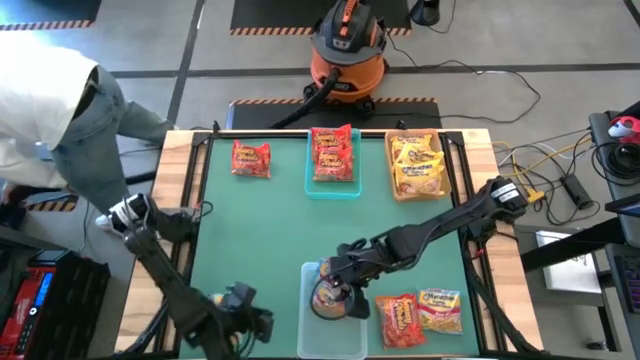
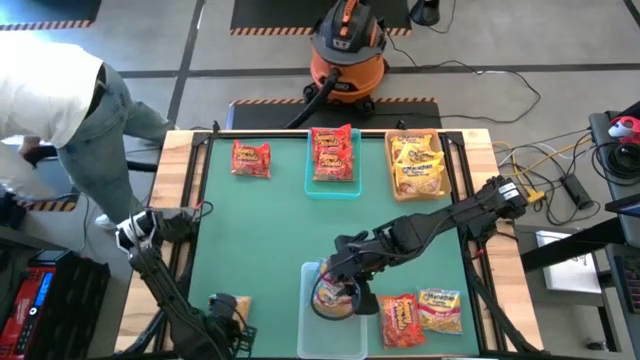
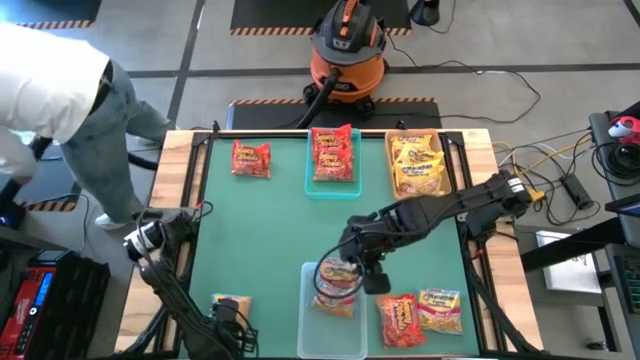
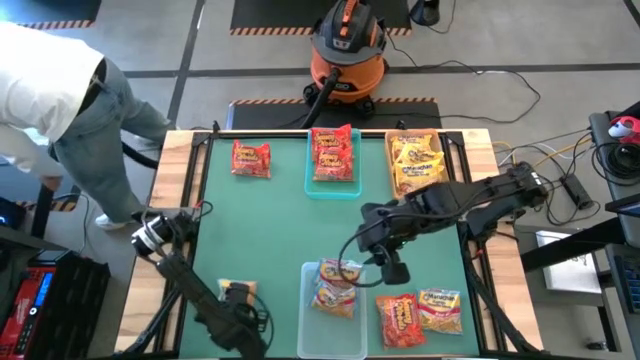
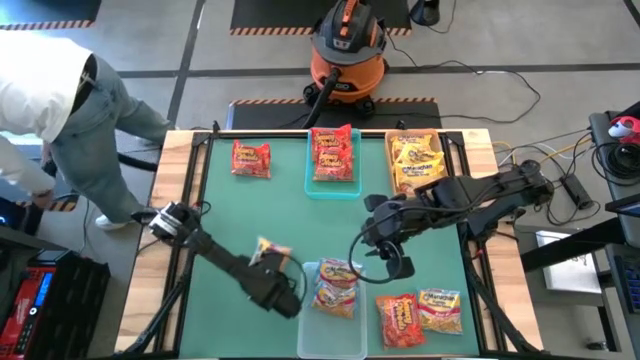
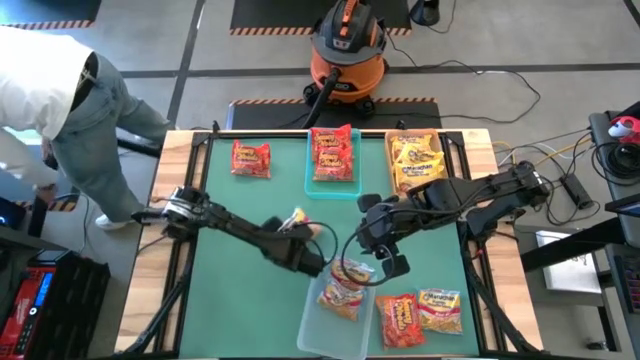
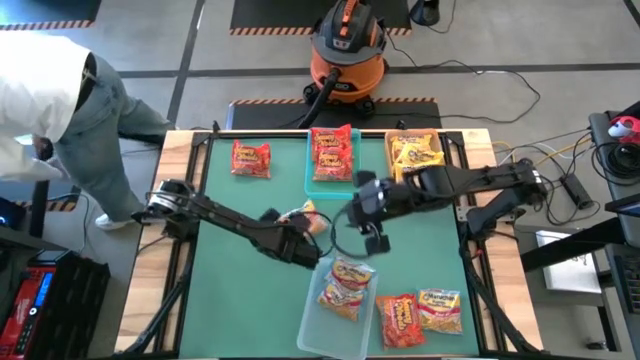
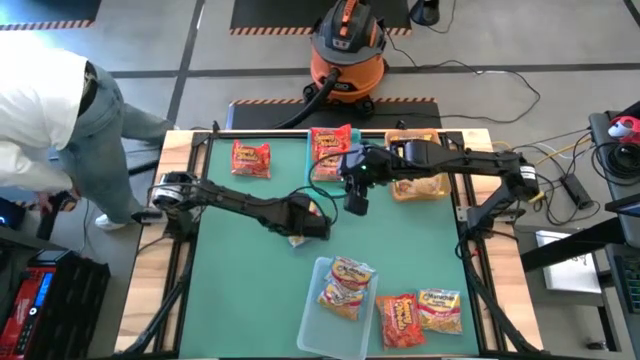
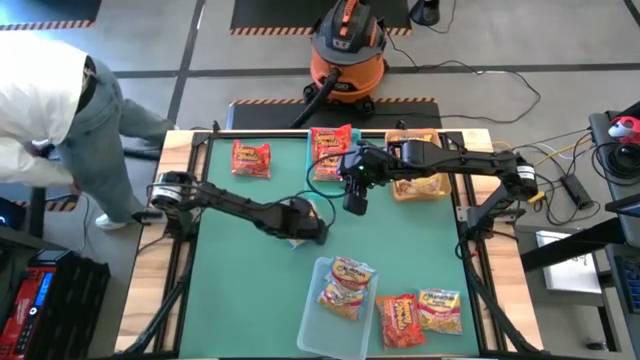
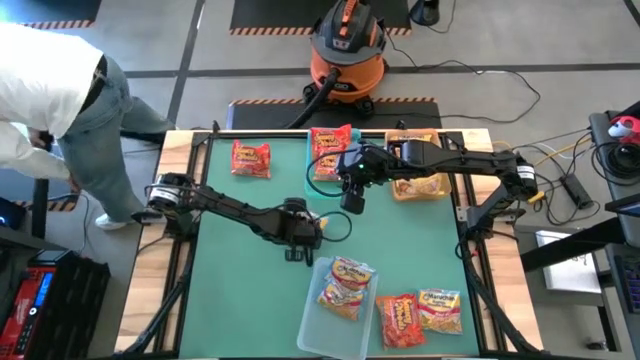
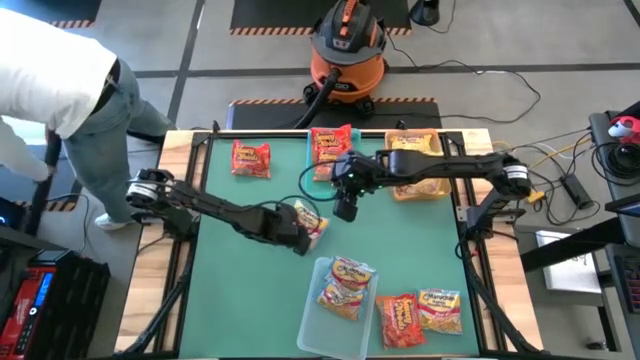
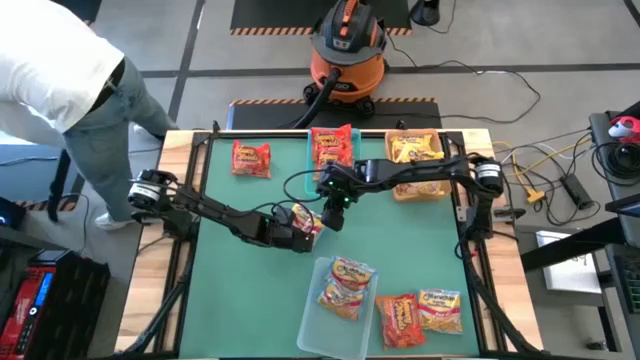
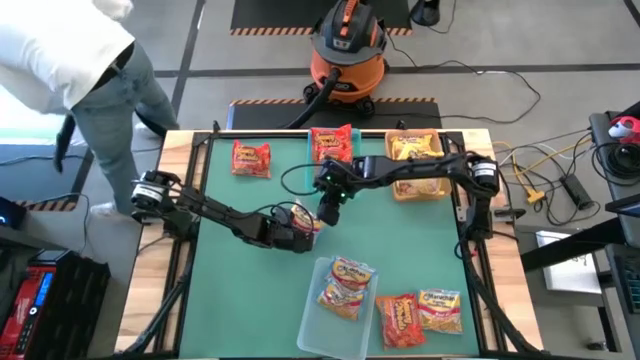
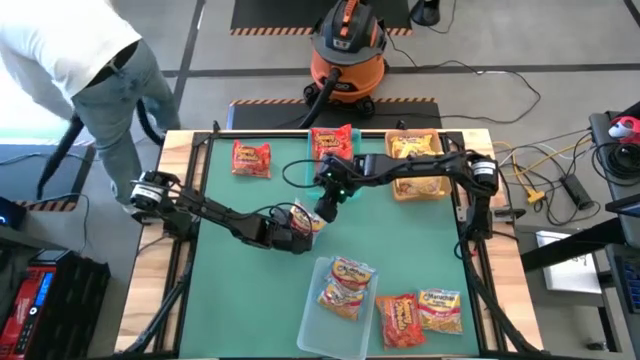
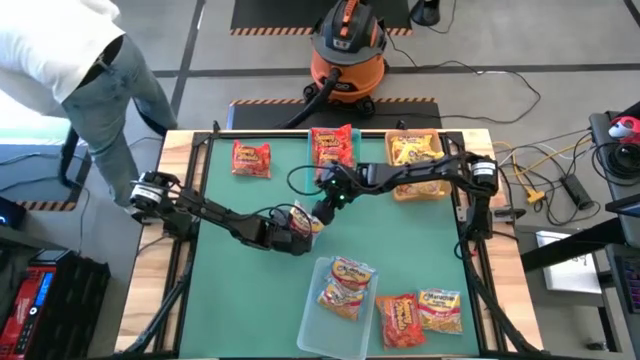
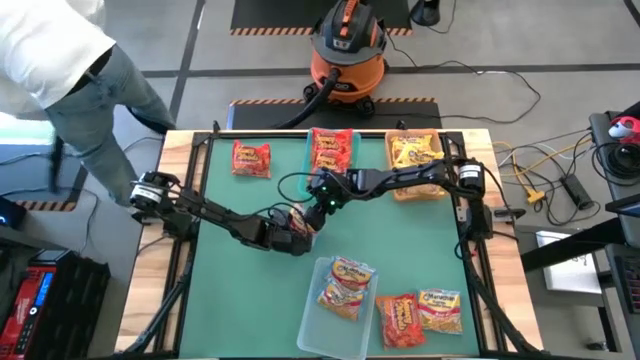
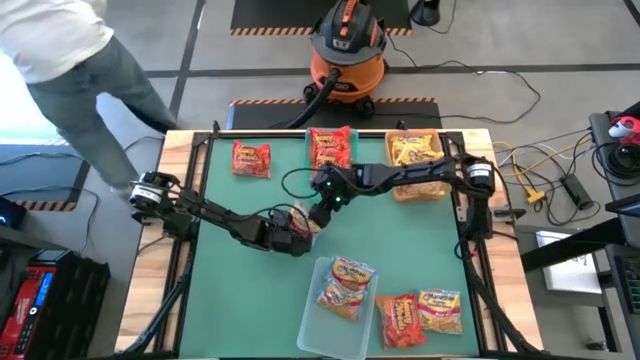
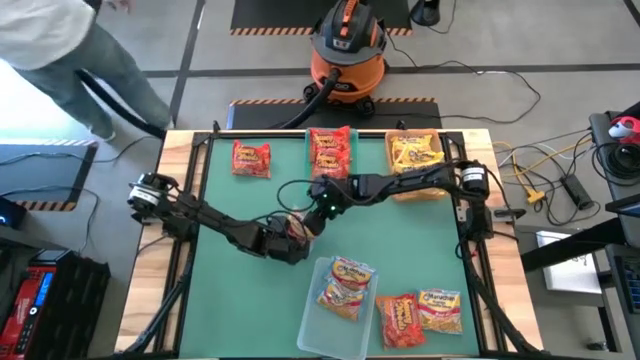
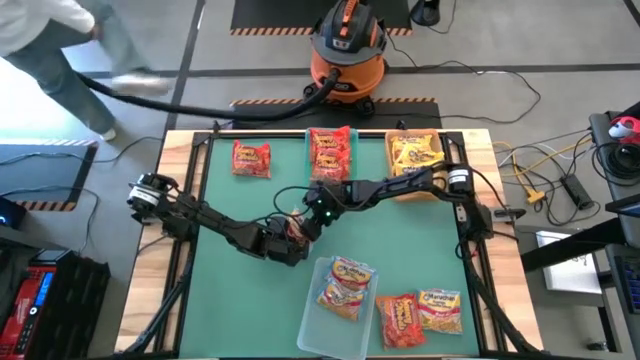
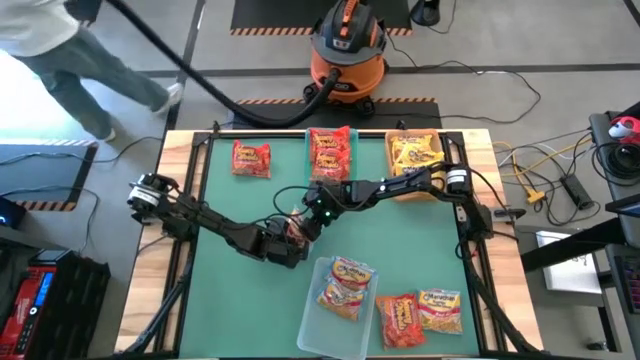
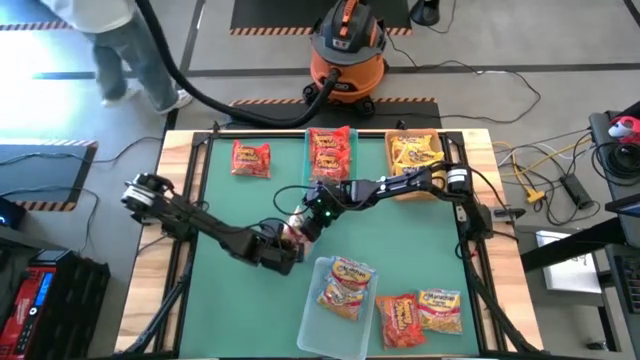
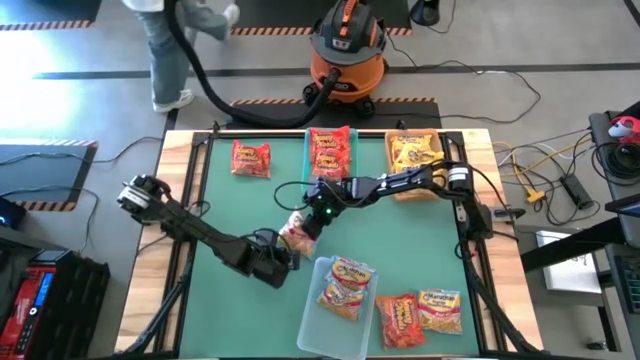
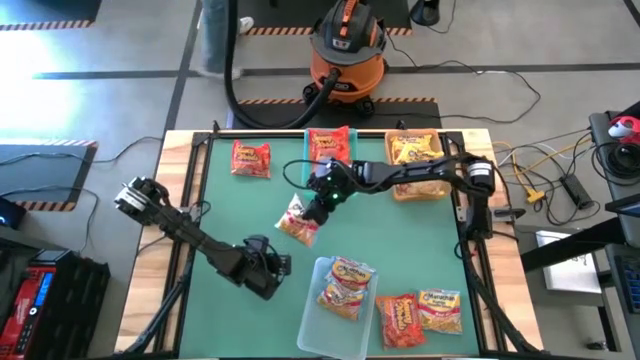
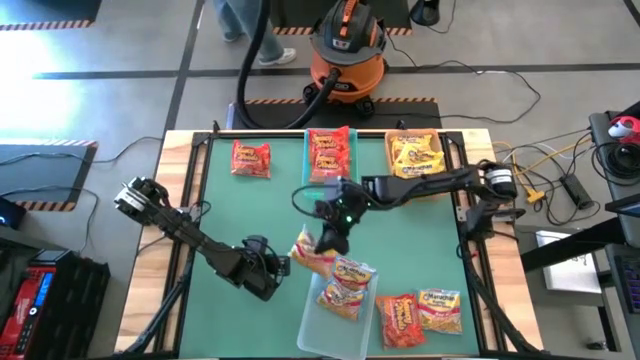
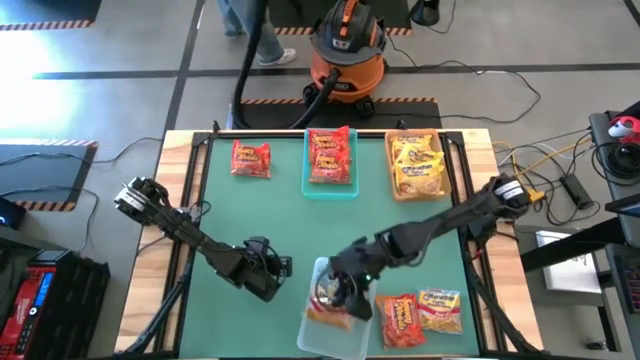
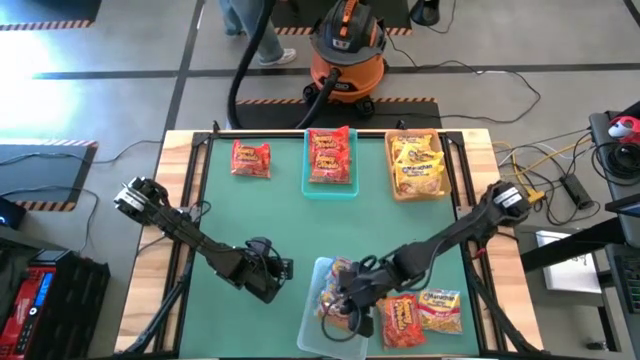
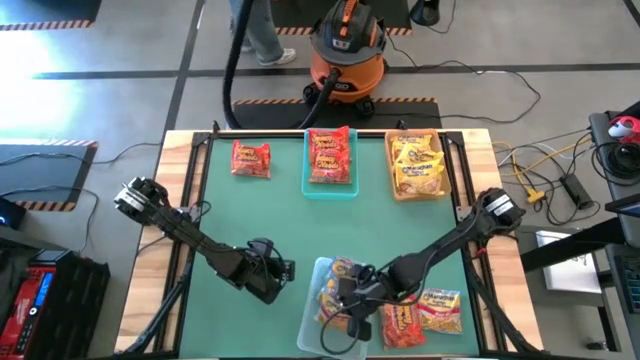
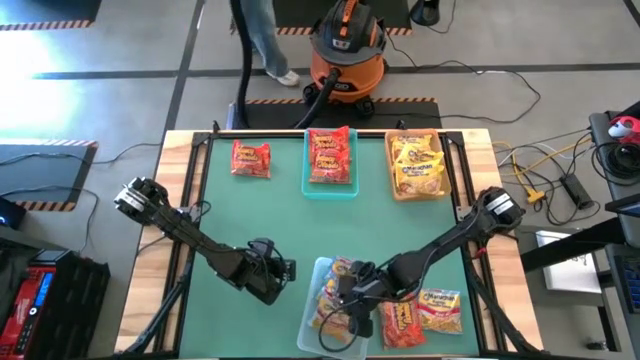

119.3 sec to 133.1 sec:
Task: Sort Maruchan noodles
Put the blue noodle pack into the transparent bin

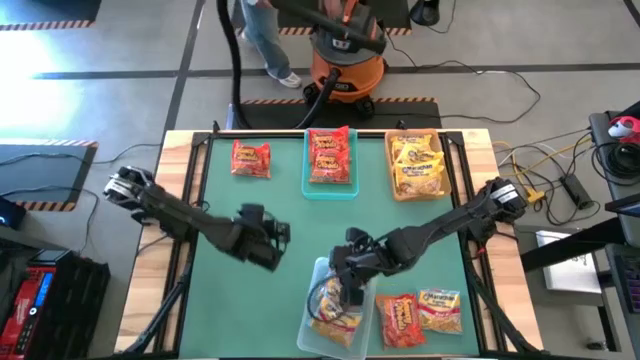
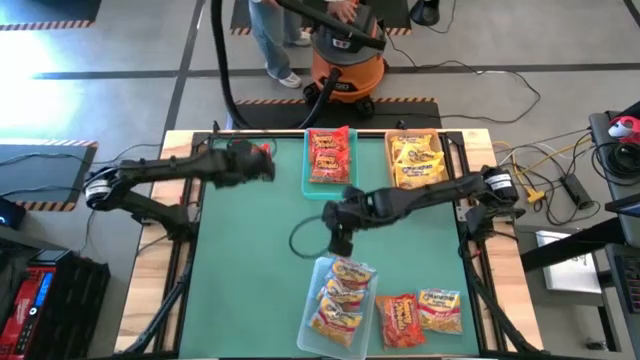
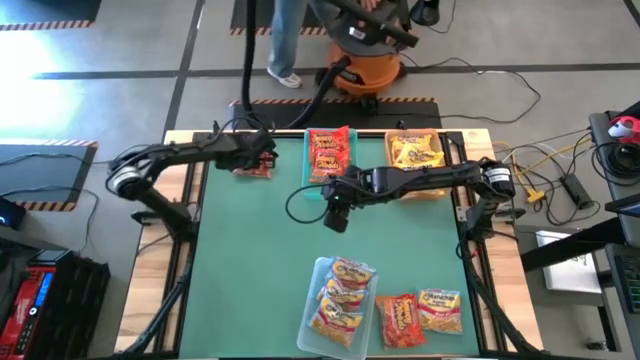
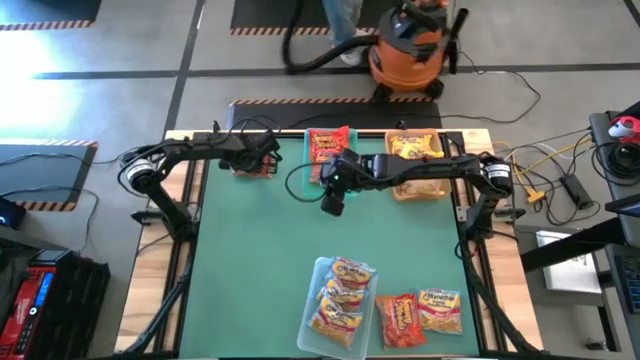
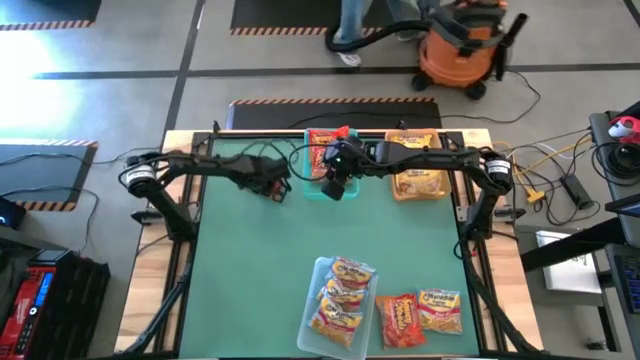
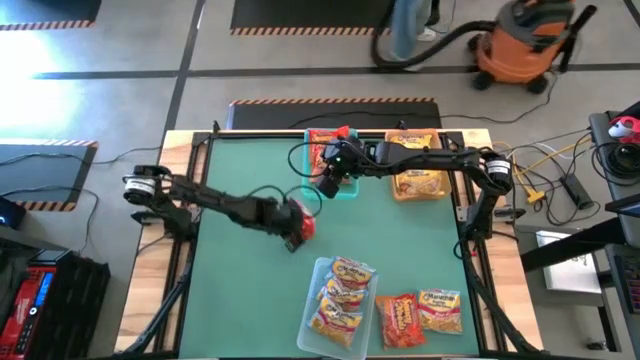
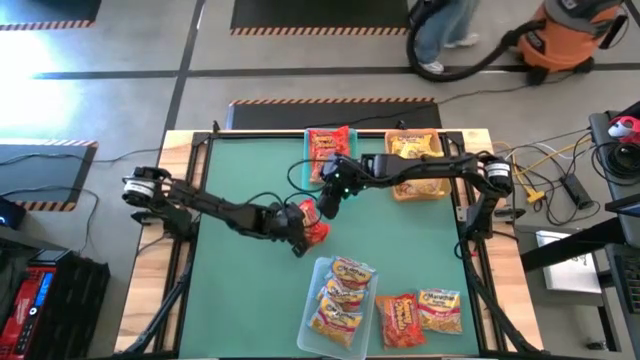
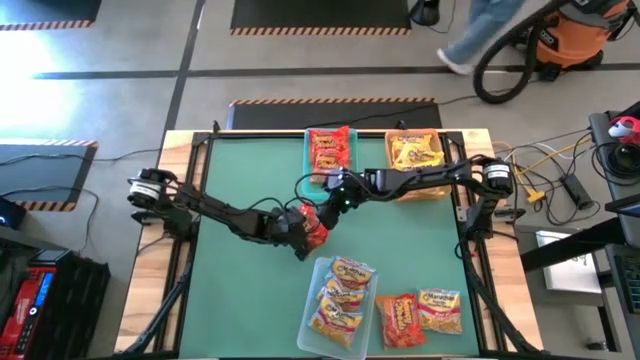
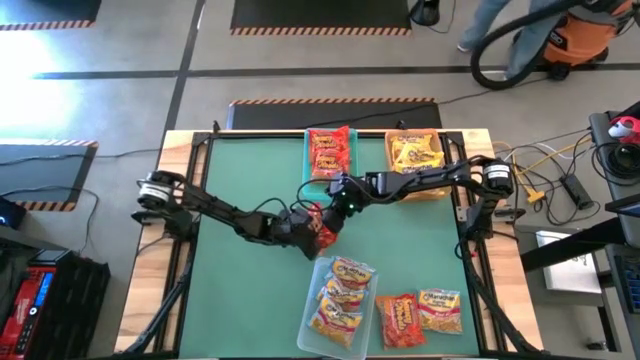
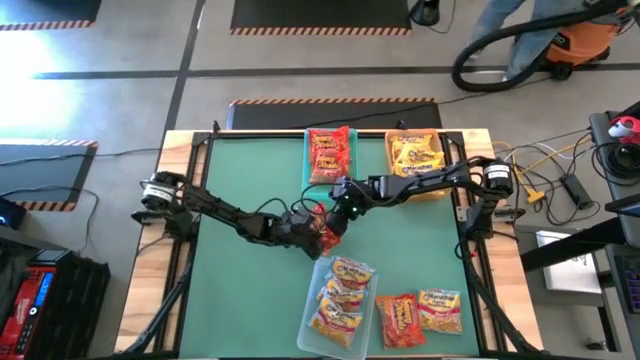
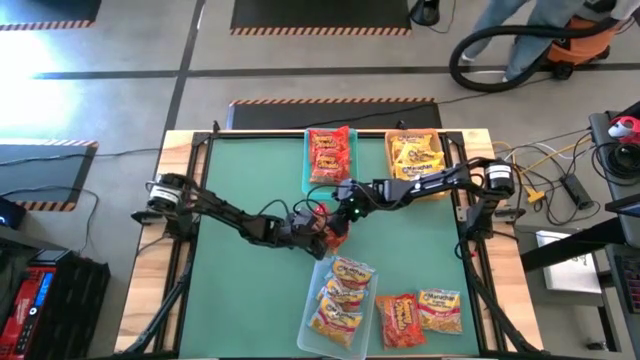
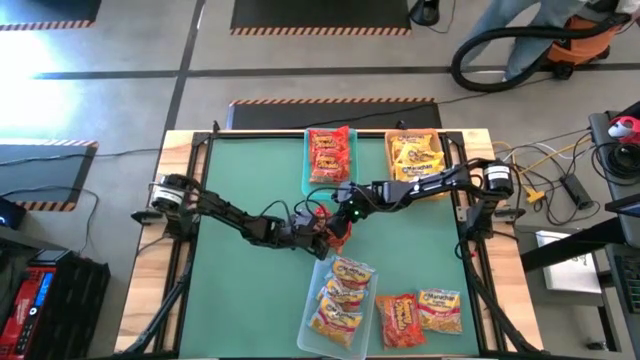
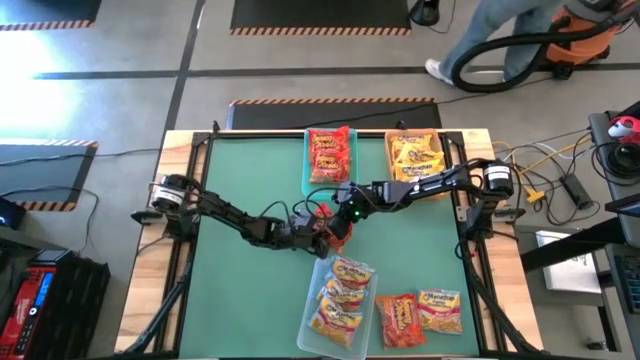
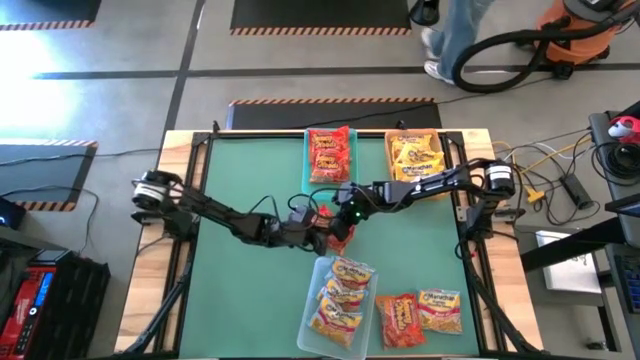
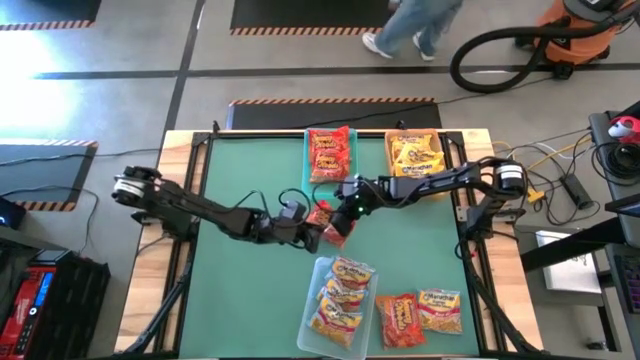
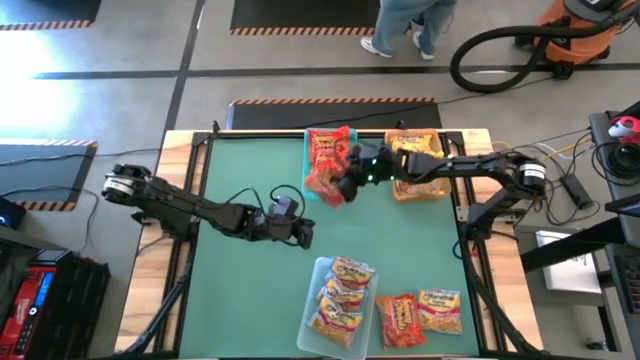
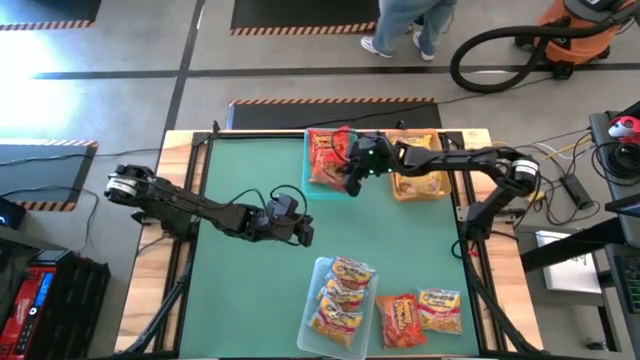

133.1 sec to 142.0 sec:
Put the red noodle pack into the green bin
